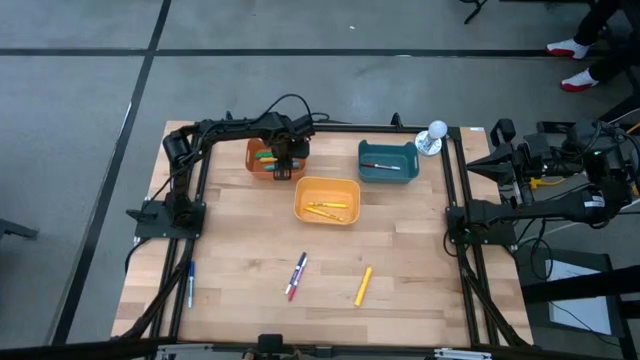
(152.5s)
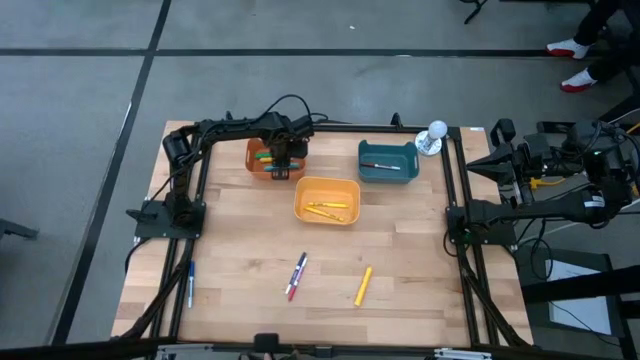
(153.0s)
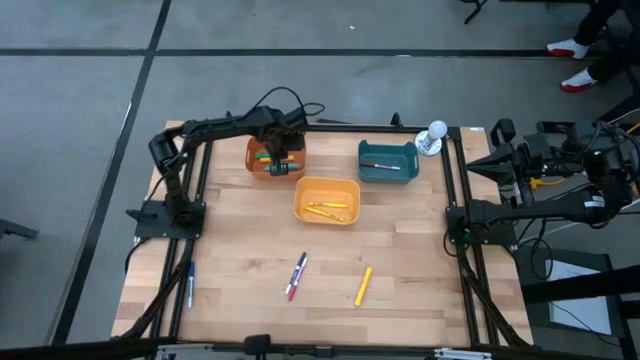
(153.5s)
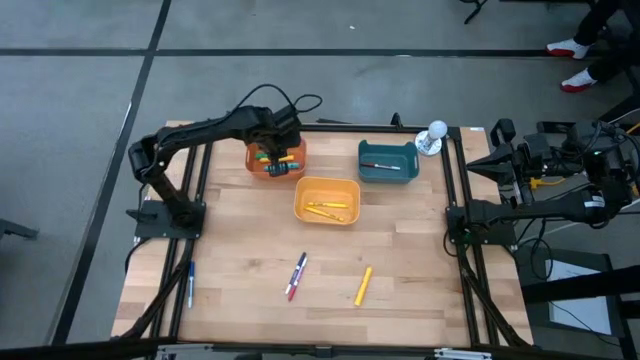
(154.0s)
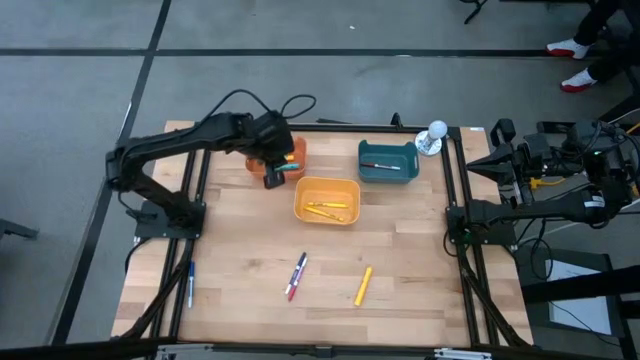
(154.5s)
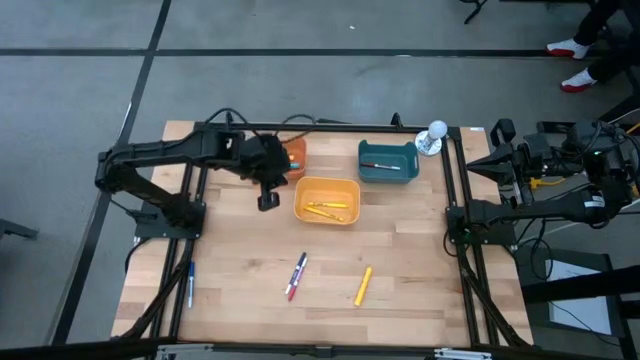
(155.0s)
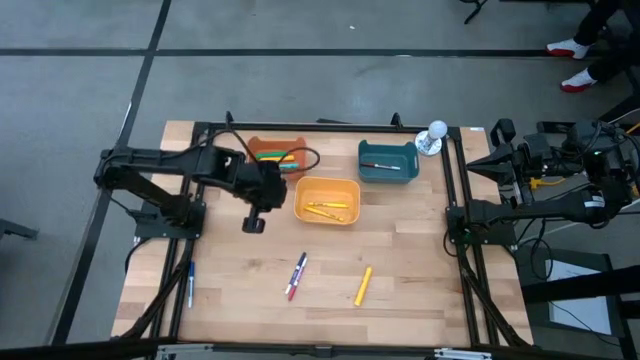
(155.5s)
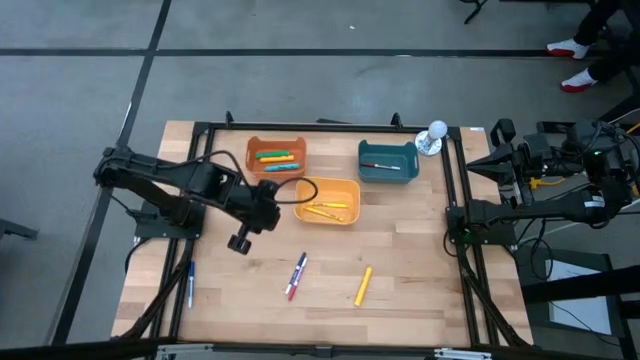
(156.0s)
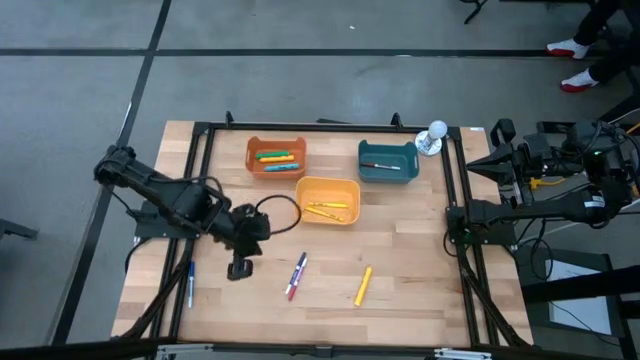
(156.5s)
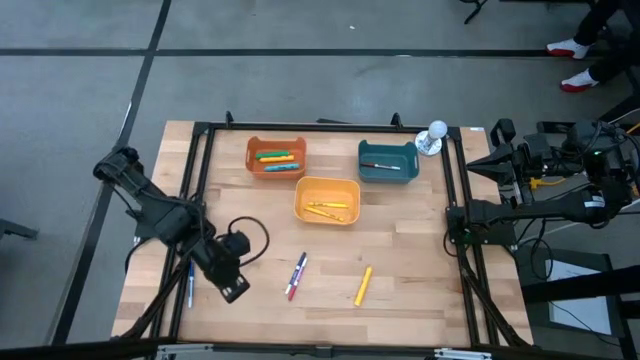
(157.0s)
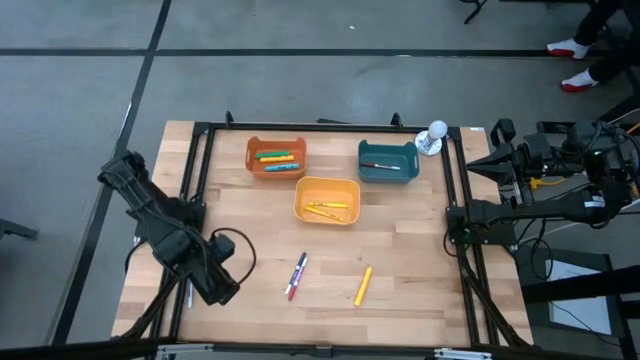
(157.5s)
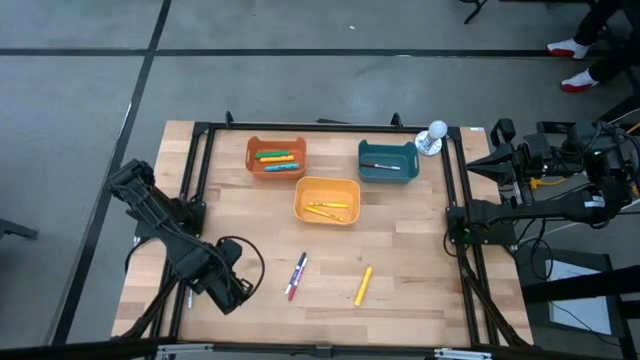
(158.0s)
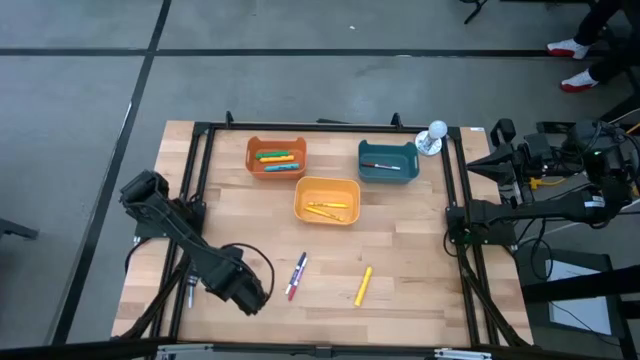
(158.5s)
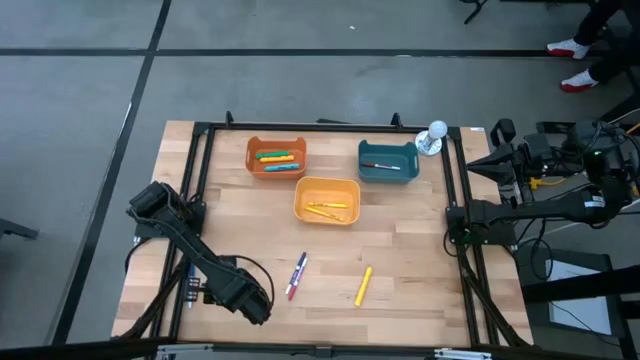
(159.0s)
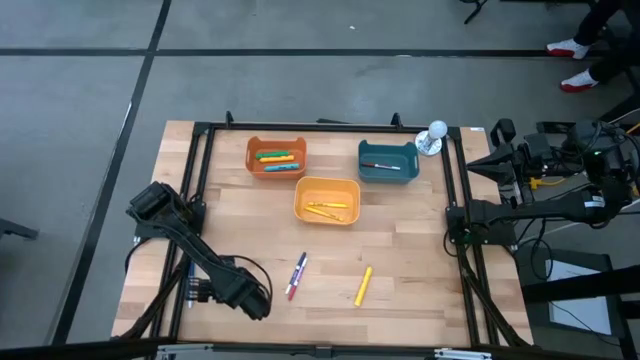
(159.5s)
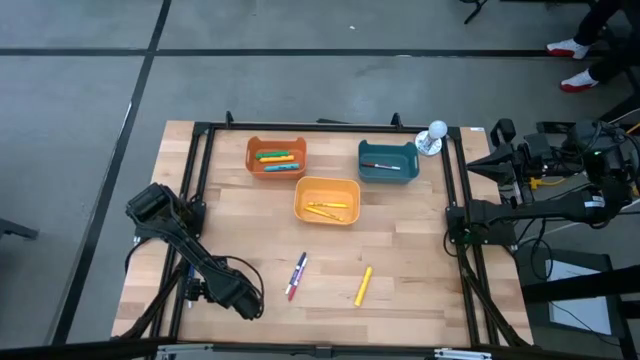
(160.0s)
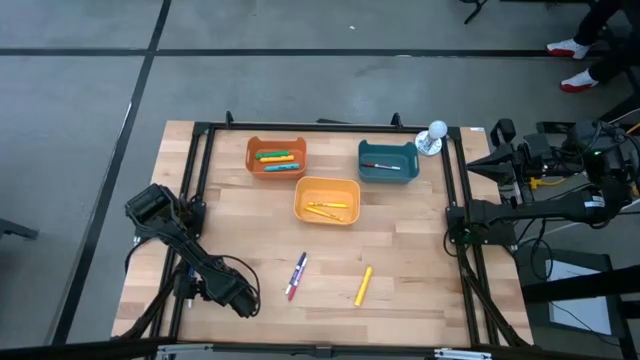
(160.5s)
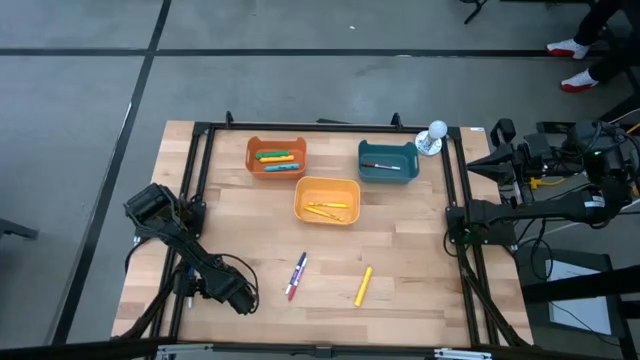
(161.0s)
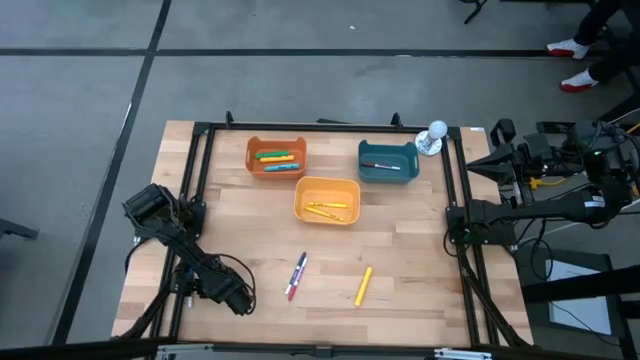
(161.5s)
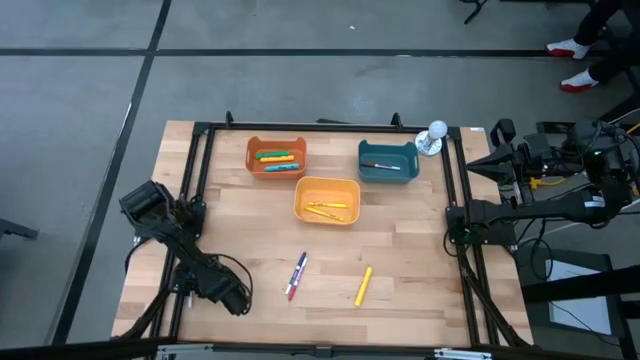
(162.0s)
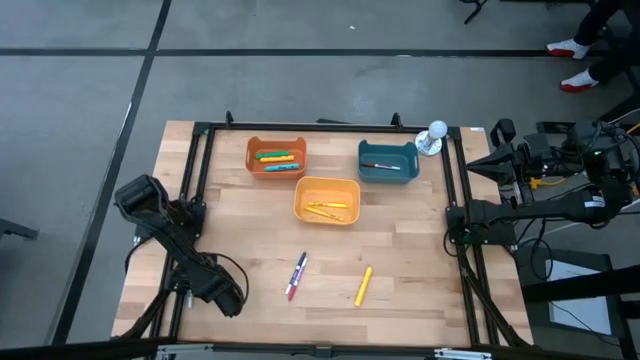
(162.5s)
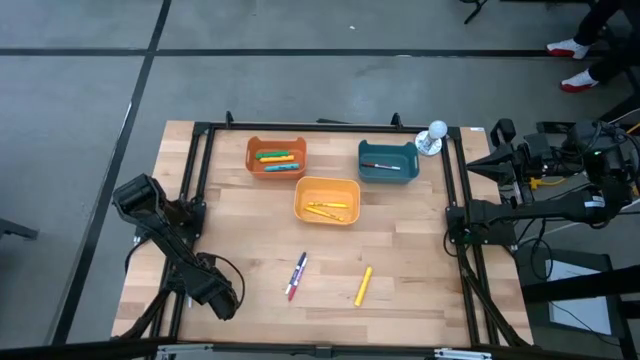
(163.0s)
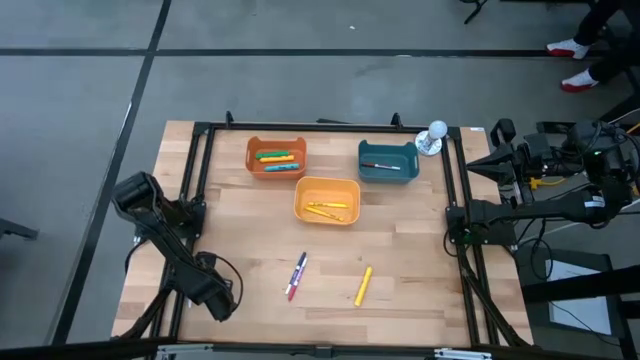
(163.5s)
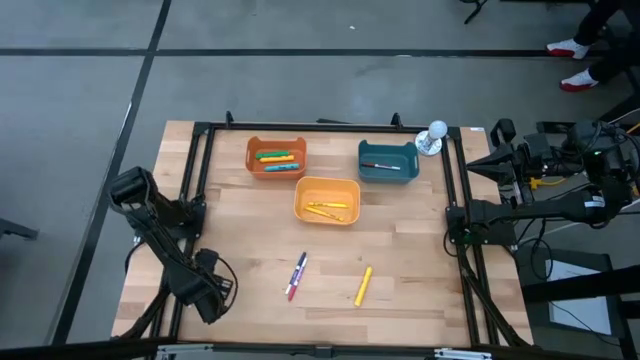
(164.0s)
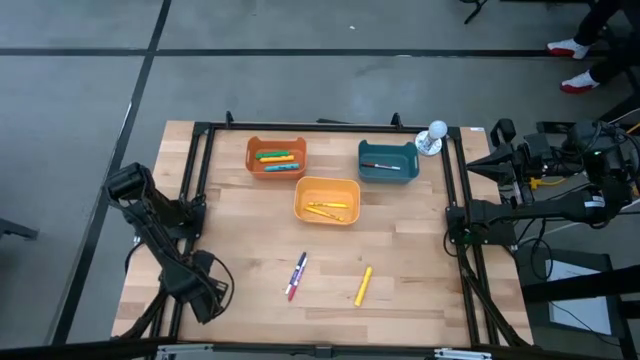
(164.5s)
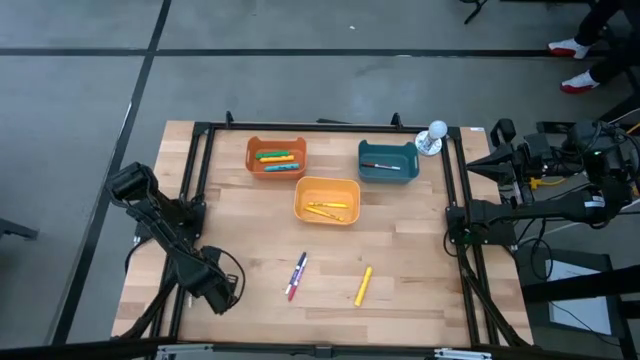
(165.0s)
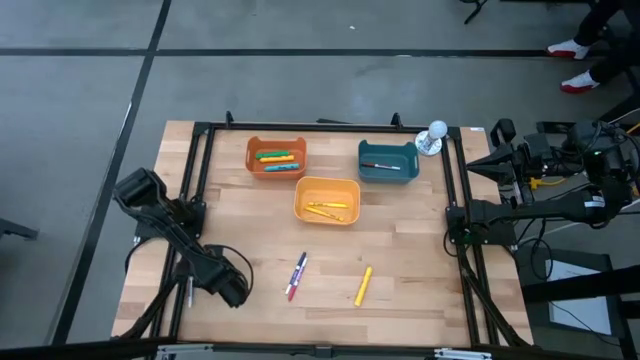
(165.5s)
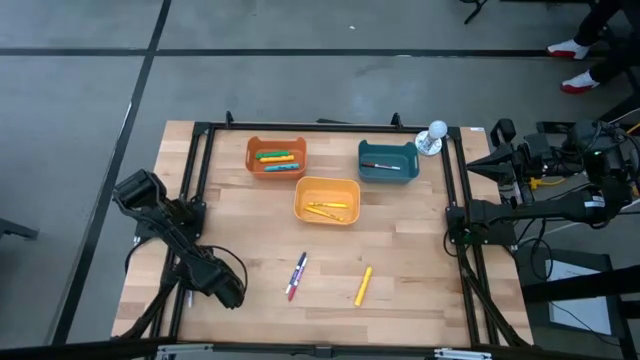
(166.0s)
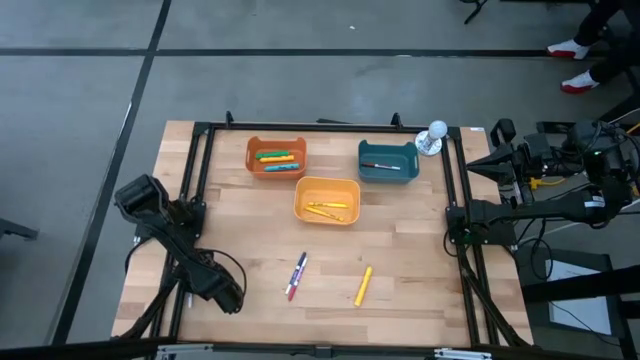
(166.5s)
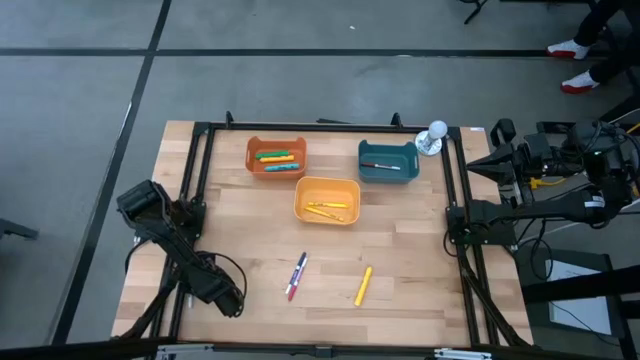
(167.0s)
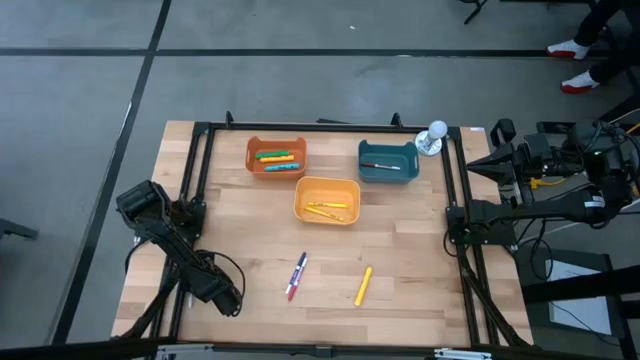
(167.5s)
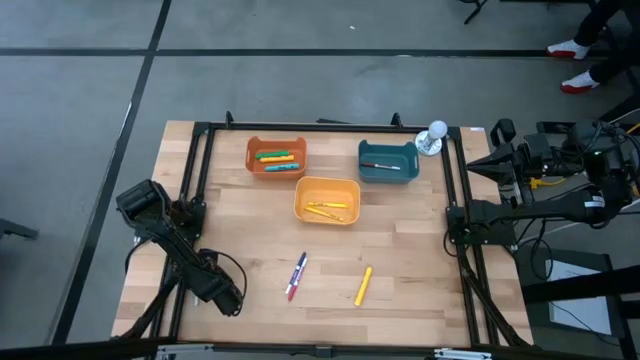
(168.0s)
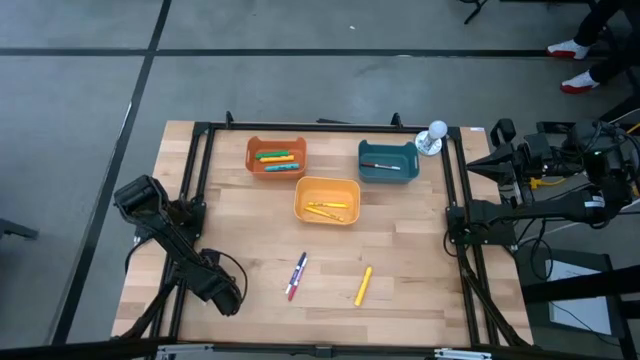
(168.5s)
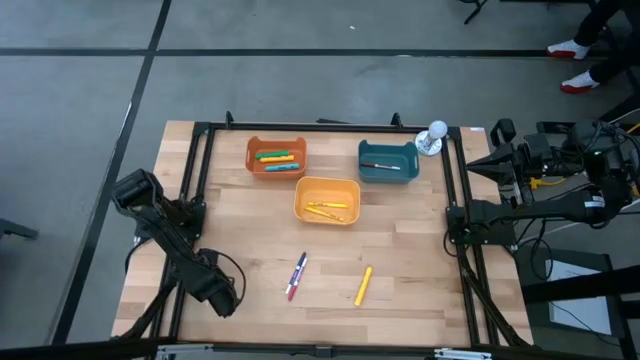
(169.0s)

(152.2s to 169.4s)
Task: Pick & Place Markers
Put the left blue marker pen into the blue bin

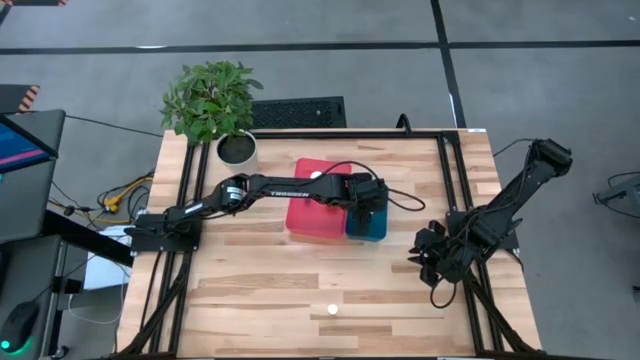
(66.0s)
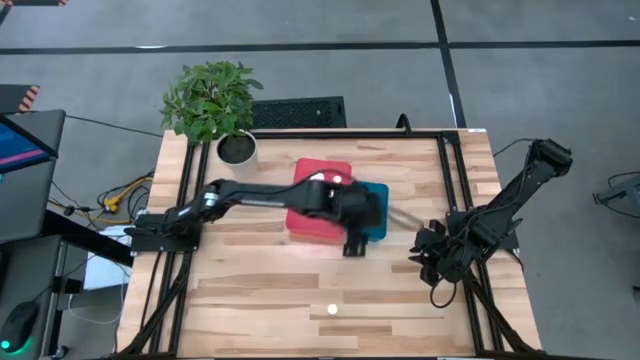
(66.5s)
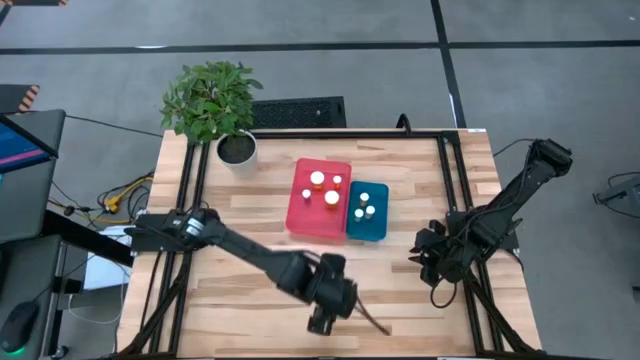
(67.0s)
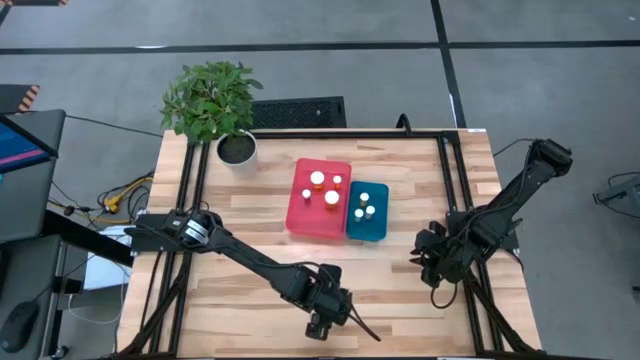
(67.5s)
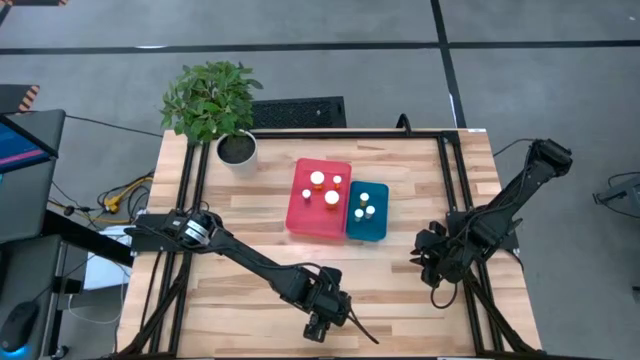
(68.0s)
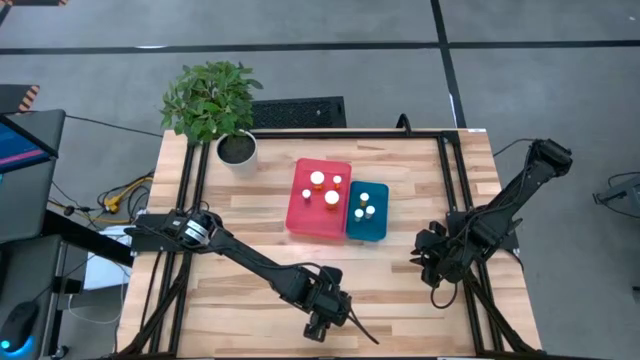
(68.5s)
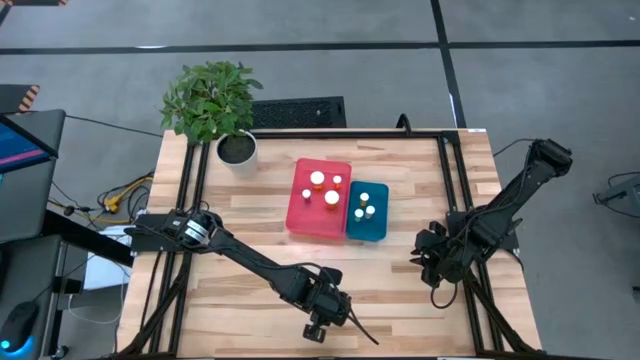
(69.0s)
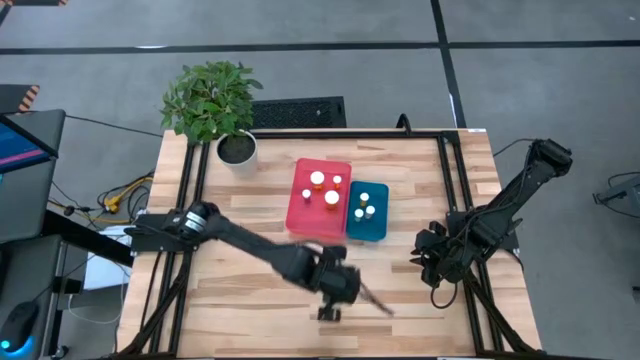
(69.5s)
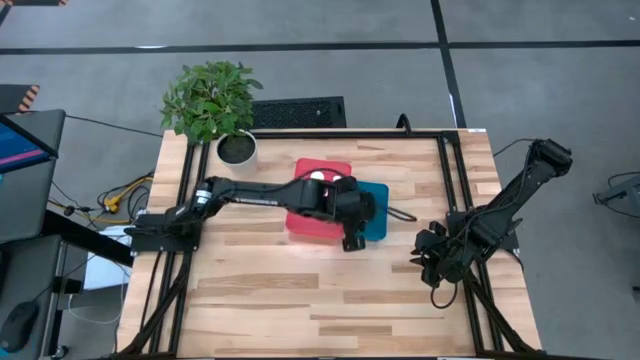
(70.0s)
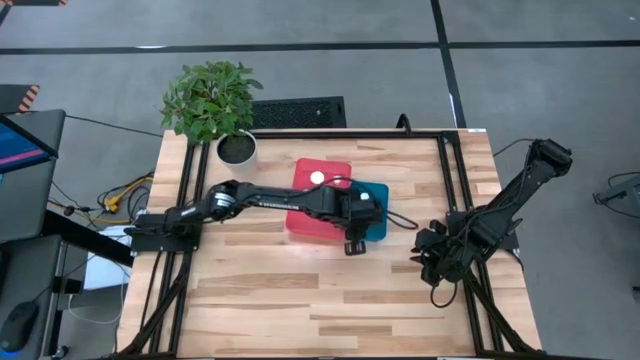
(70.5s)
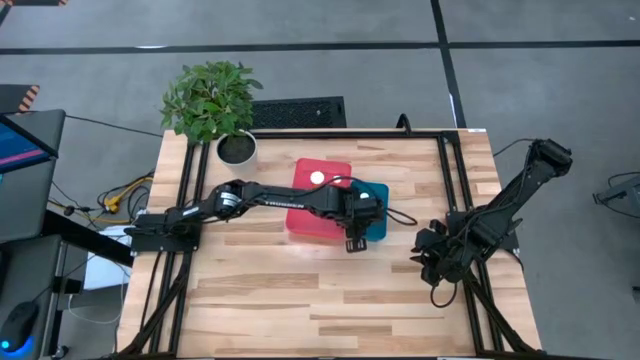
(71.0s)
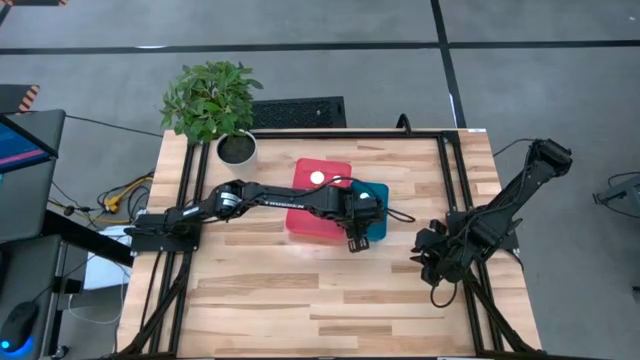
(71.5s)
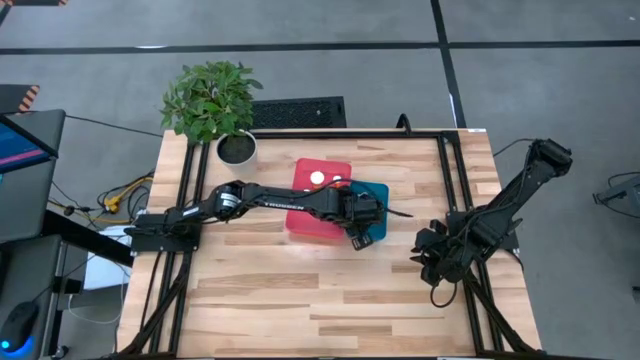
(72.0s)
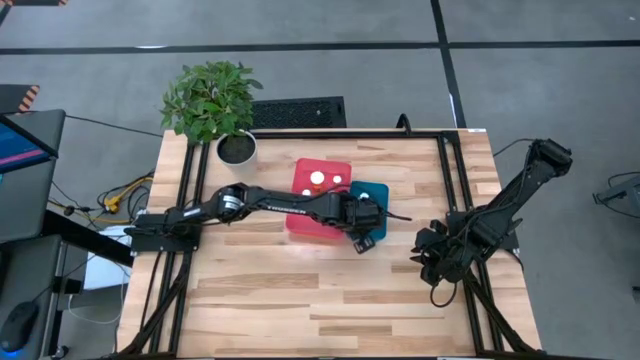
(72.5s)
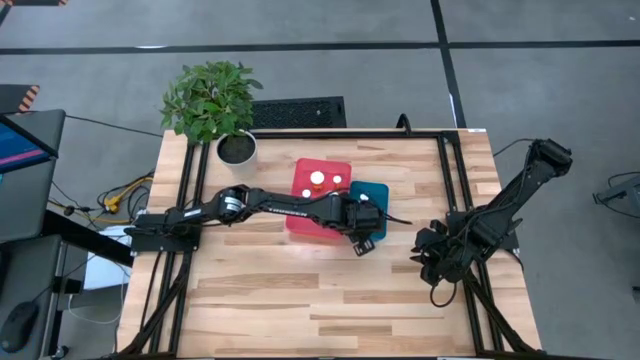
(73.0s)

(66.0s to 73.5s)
Task: Pick and place medicine bottles into bin by pill shape (circle, oval)
Put the yellow pill bottle into the blue bin
